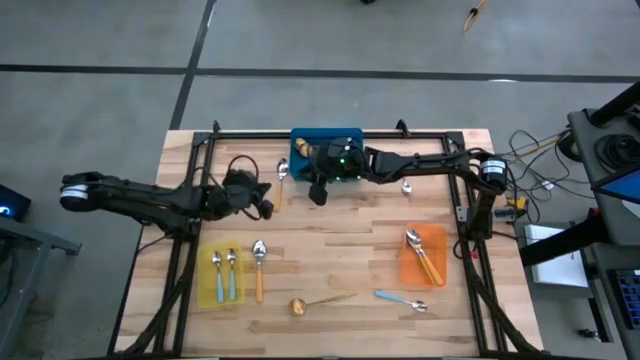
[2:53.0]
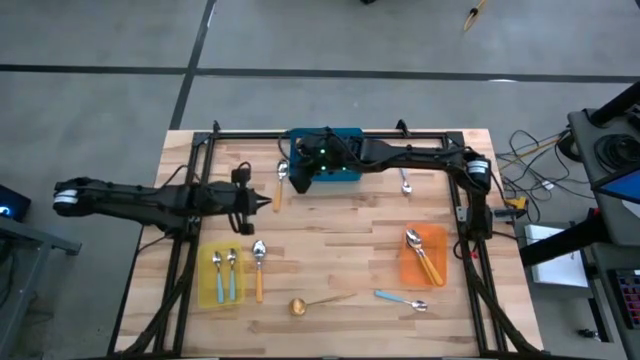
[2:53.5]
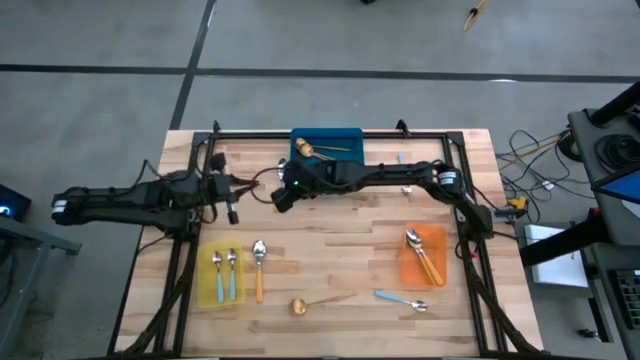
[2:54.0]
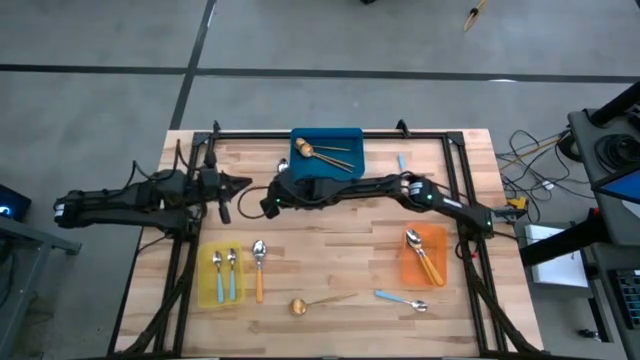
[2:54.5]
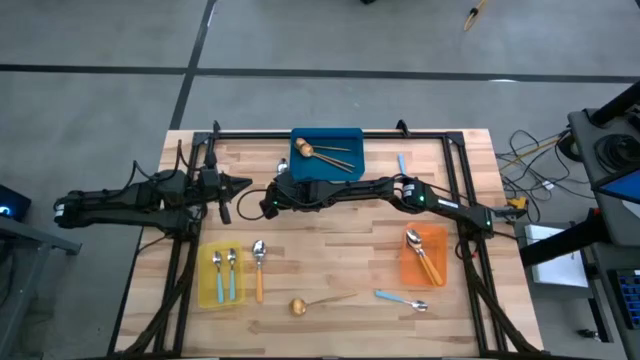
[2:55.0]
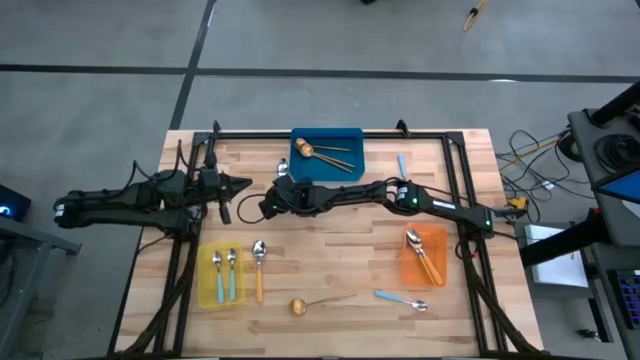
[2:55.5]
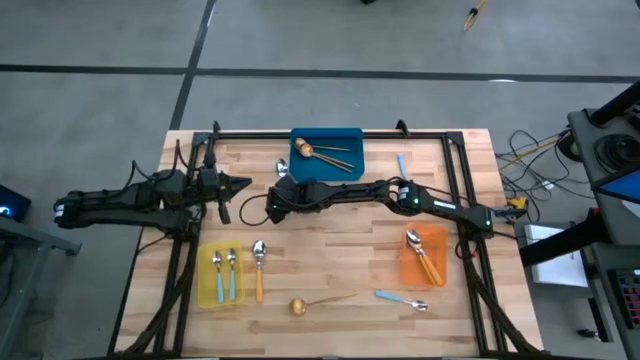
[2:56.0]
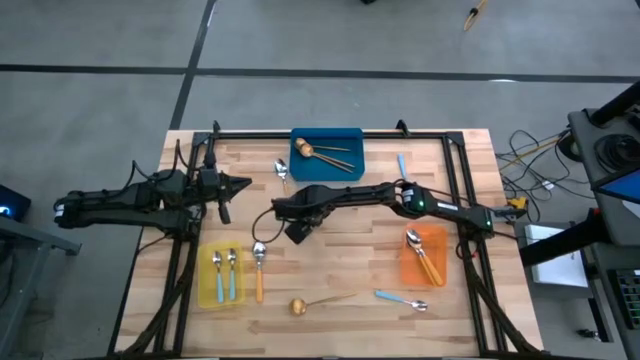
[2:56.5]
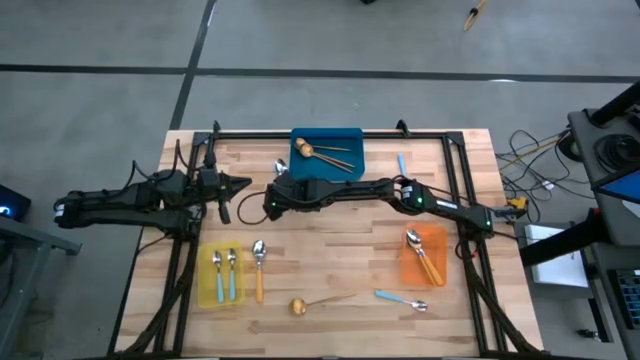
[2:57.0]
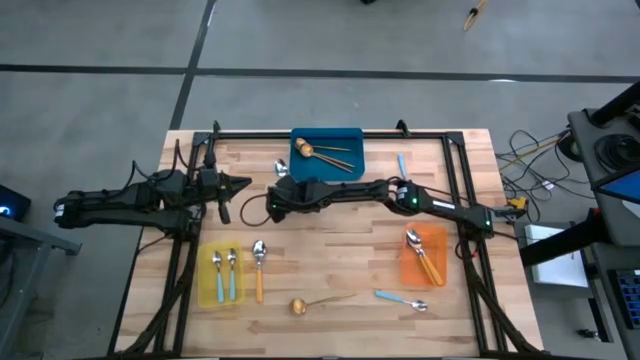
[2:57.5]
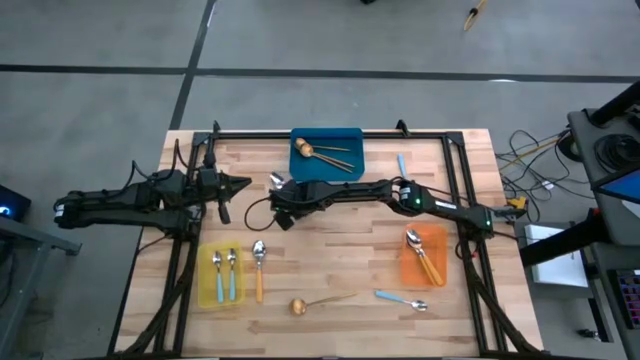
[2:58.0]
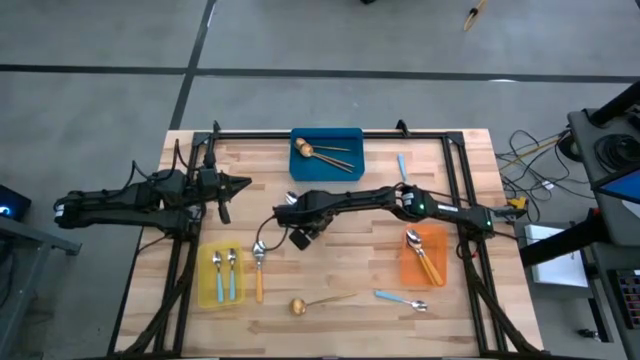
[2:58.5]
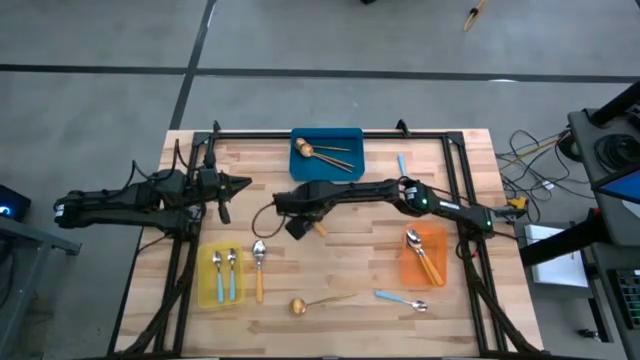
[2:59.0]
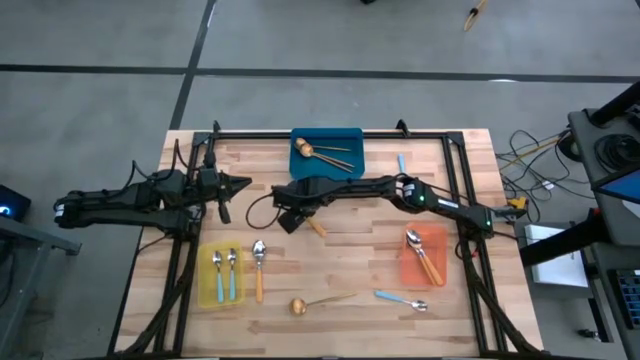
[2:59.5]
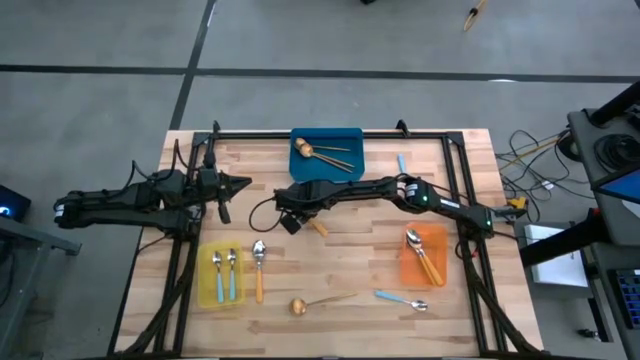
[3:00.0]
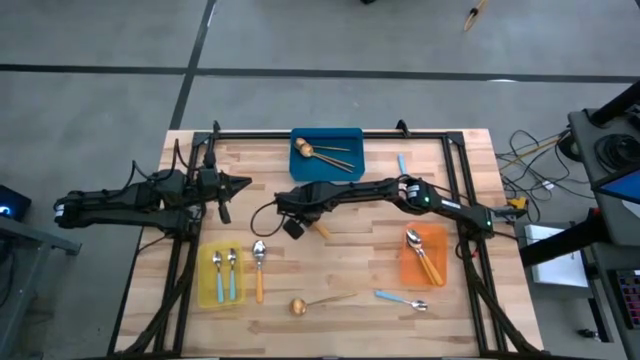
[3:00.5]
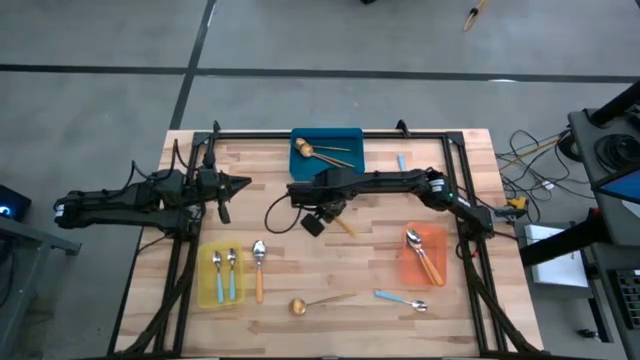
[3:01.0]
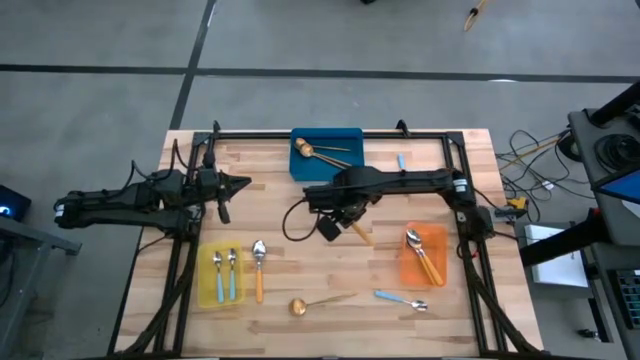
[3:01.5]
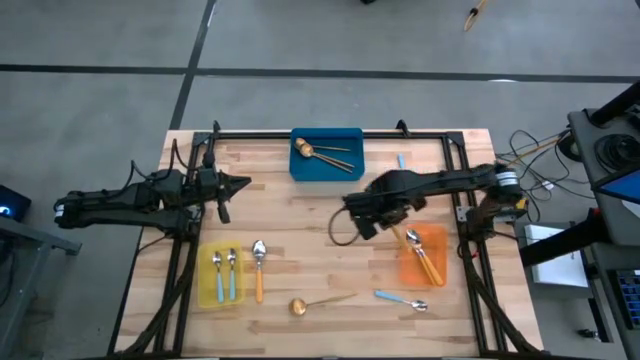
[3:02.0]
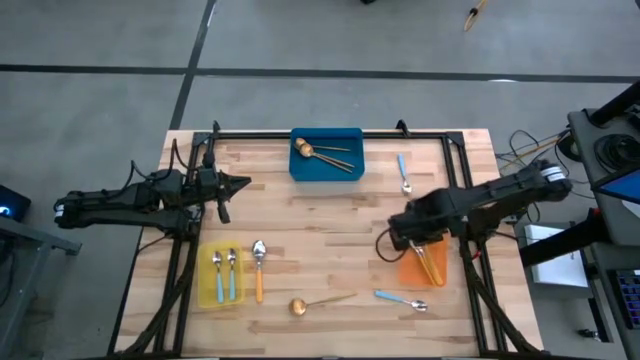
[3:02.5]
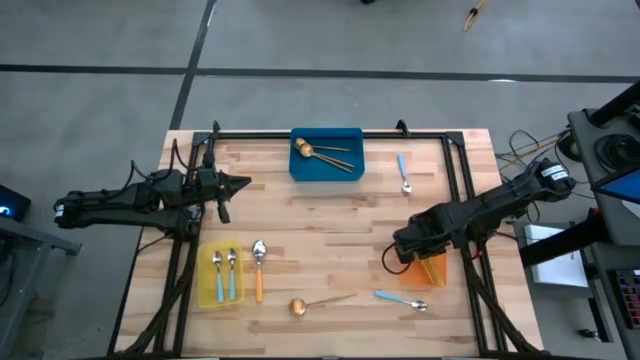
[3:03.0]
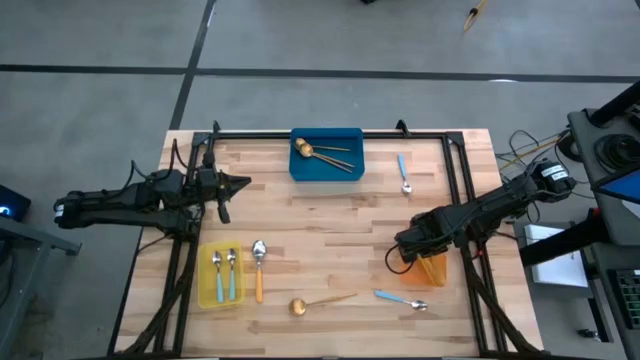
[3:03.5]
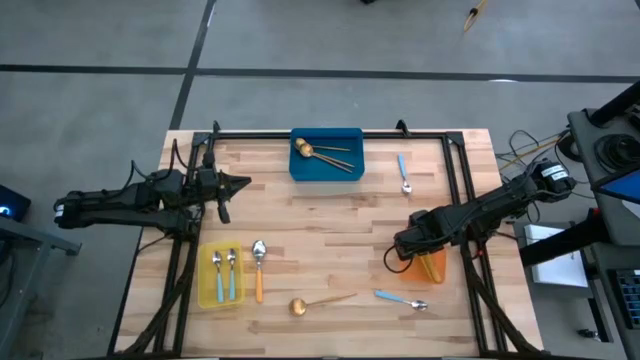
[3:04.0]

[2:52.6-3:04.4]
Task: Sort silverware by color (type)
Put the orange spoon into the orange bin

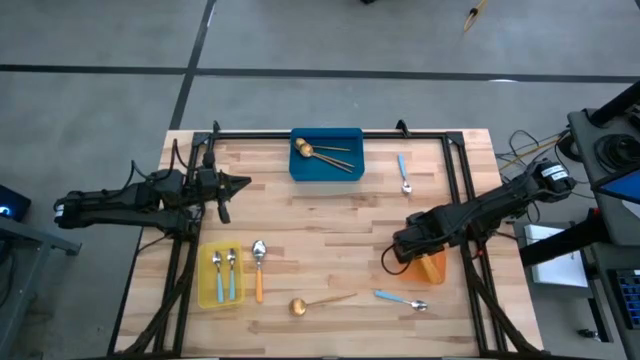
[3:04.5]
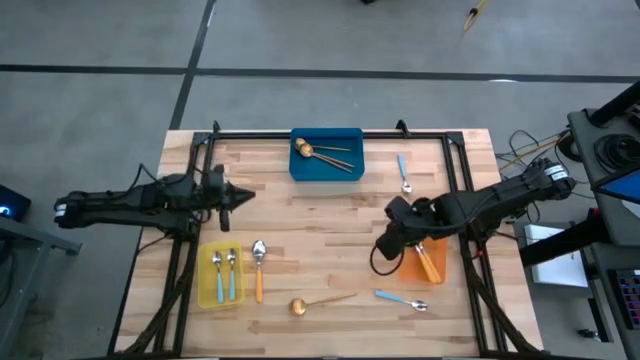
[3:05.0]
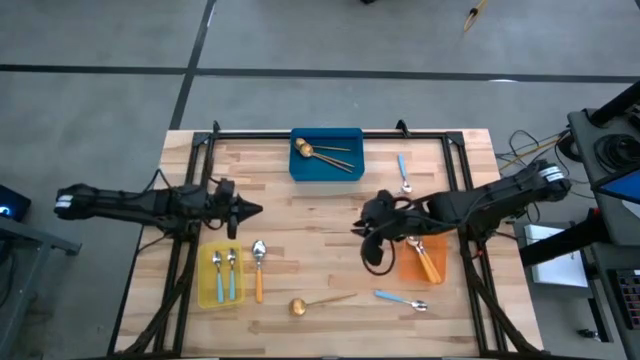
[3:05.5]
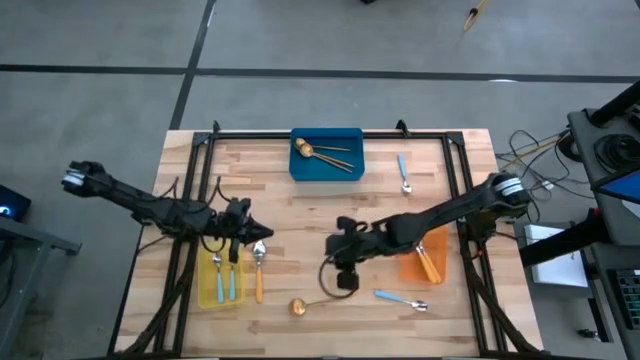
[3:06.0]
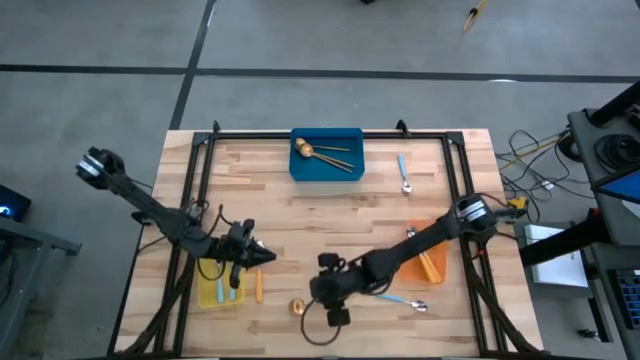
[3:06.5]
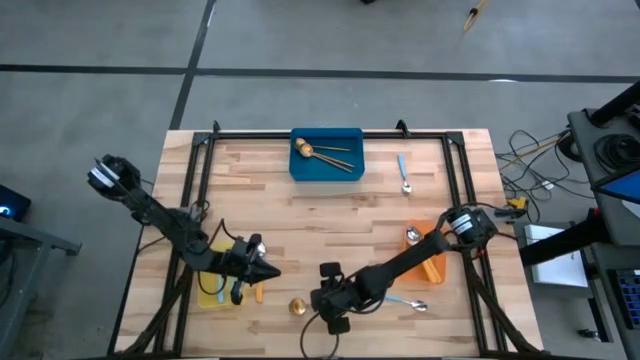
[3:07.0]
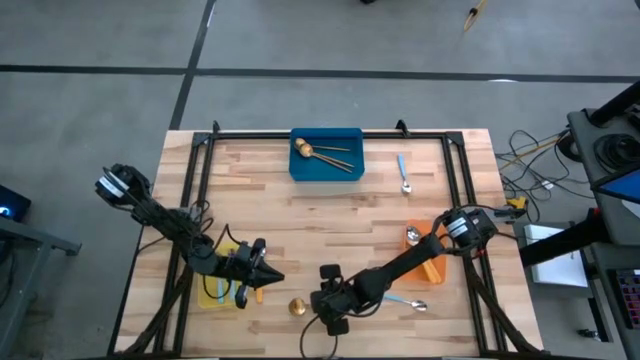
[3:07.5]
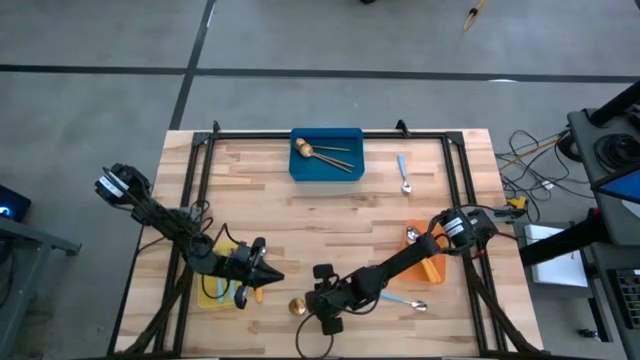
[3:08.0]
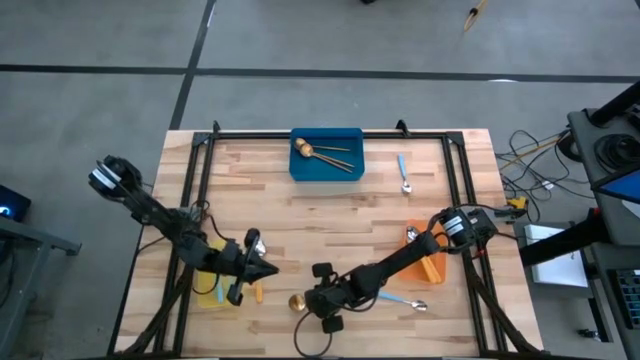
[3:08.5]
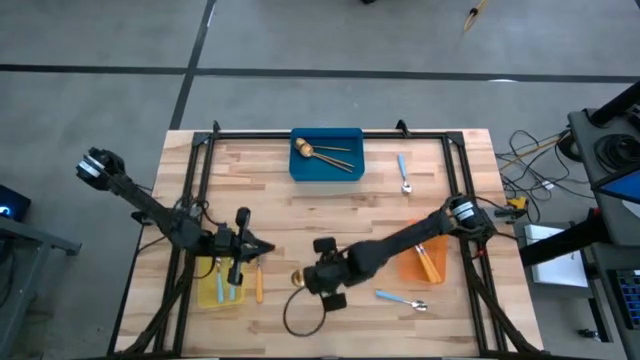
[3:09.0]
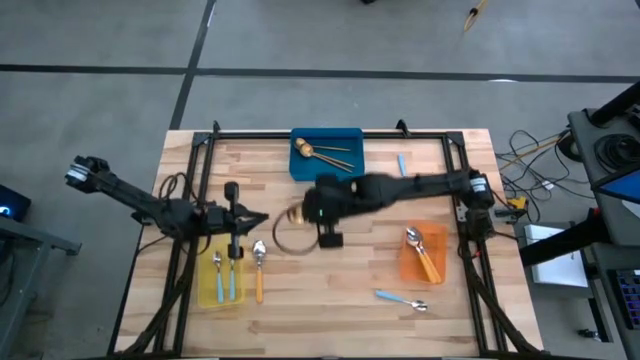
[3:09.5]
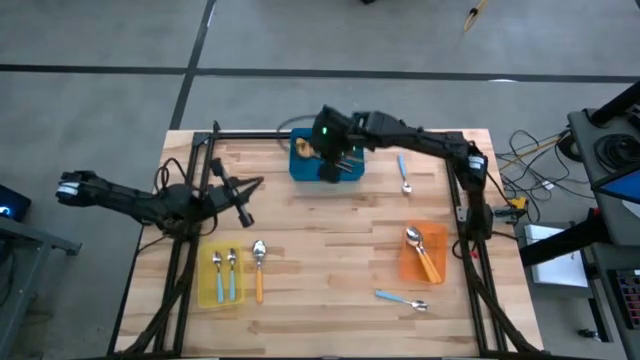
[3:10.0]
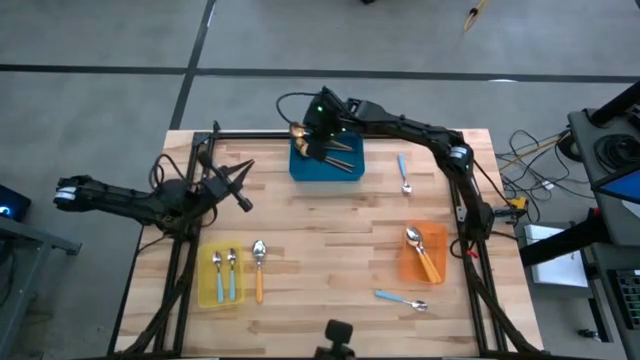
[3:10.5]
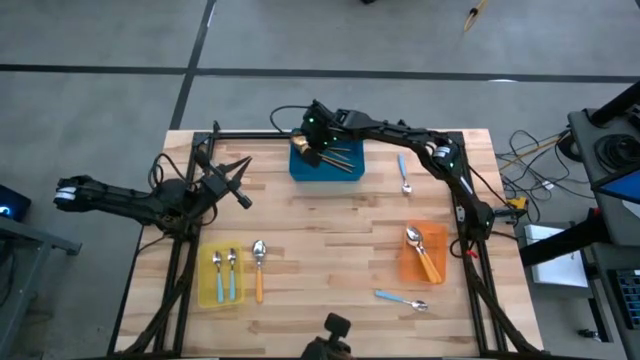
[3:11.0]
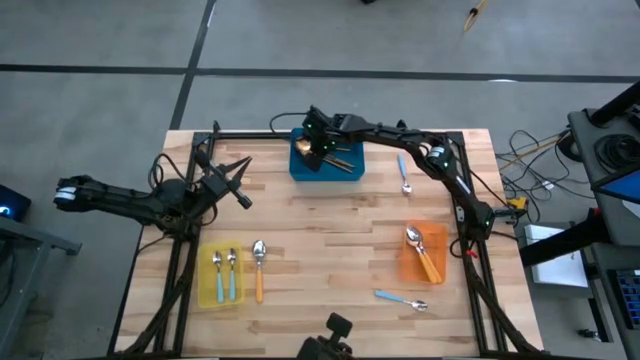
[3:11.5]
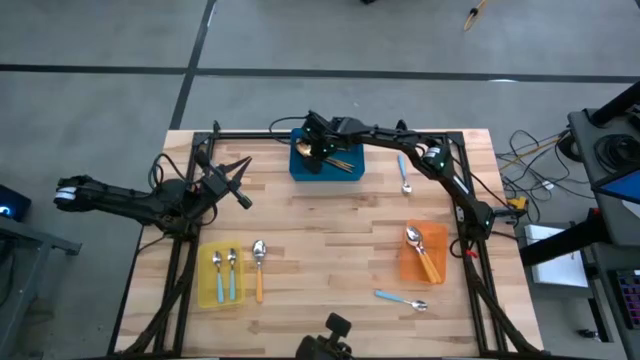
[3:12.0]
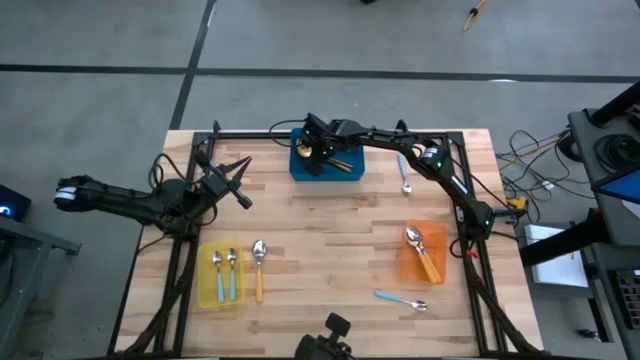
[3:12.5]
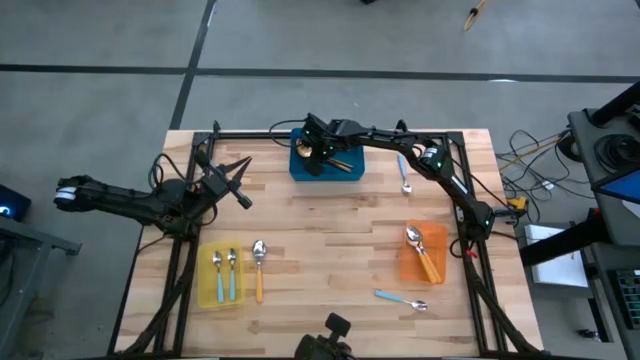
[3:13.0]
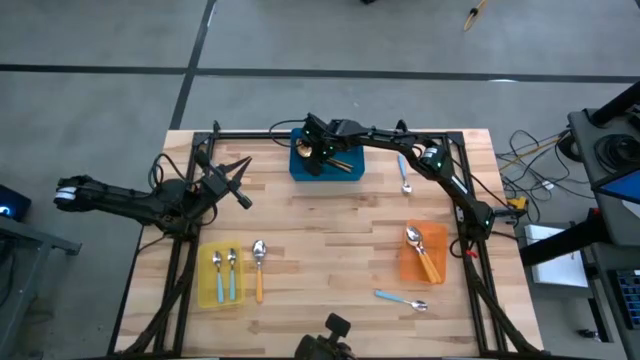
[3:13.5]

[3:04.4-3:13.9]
Put the gold spoon into the blue bin
